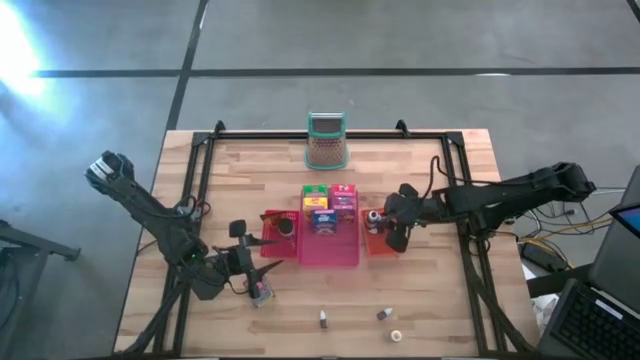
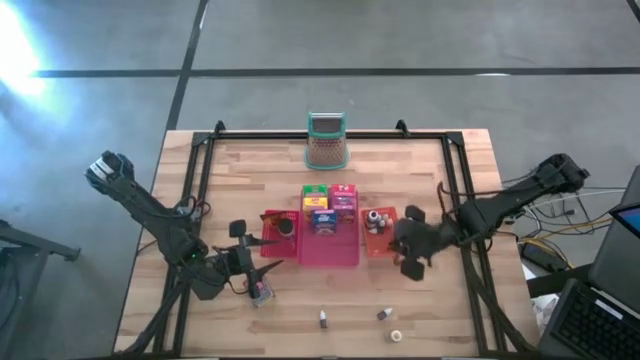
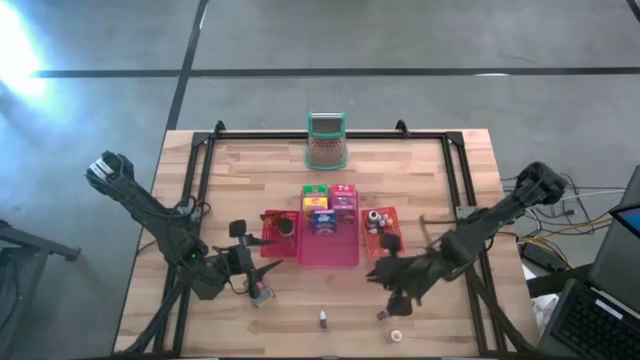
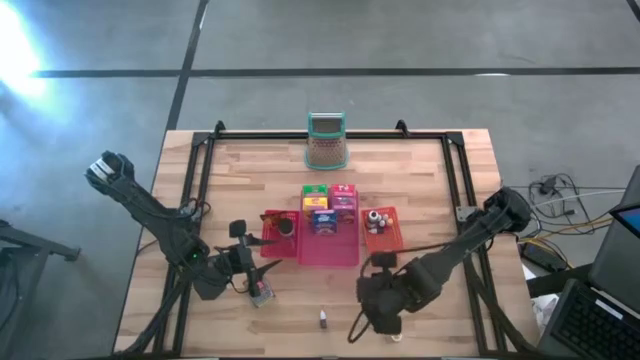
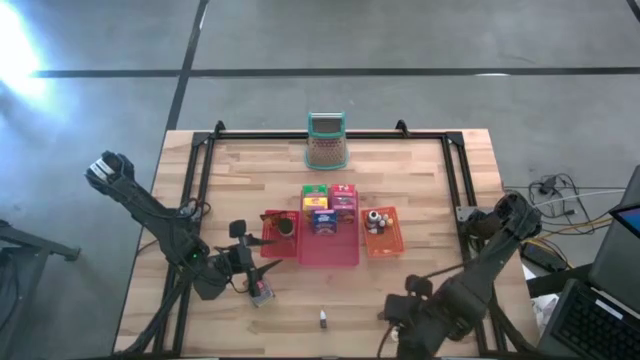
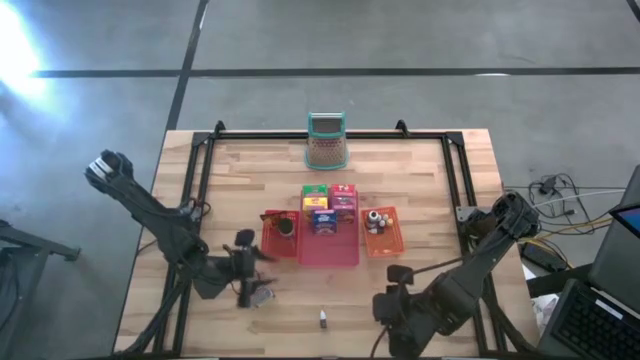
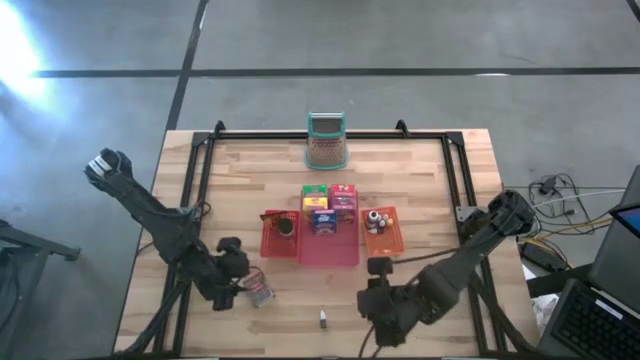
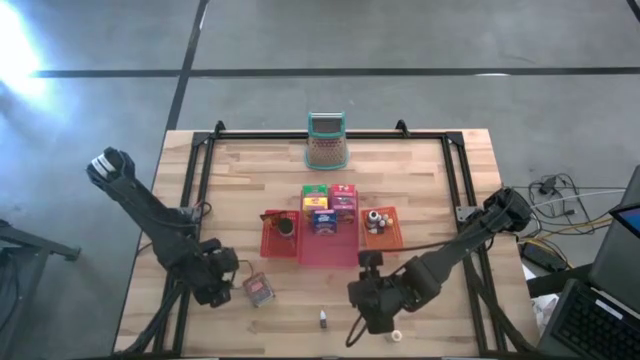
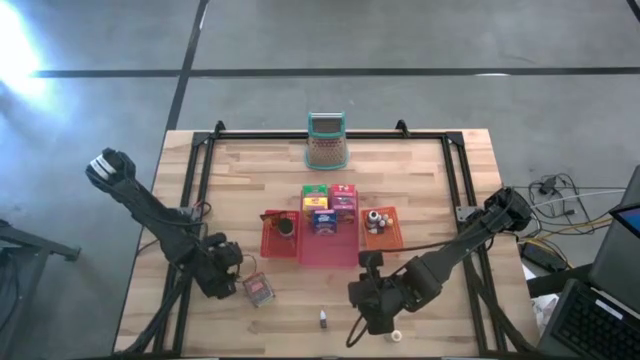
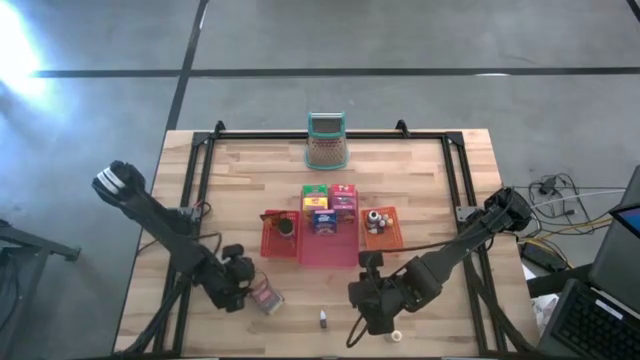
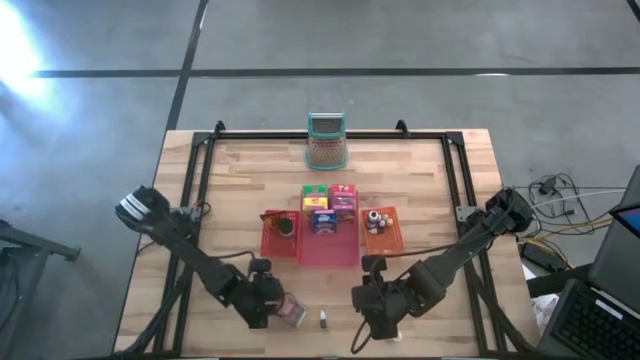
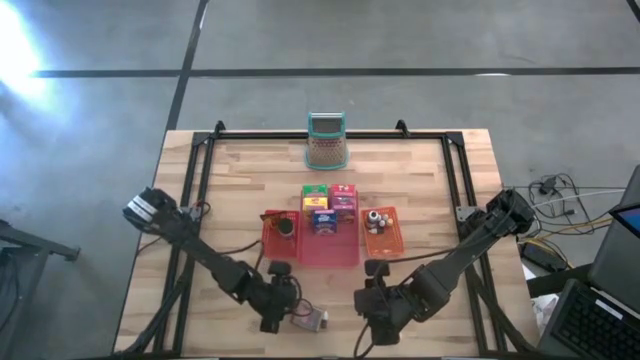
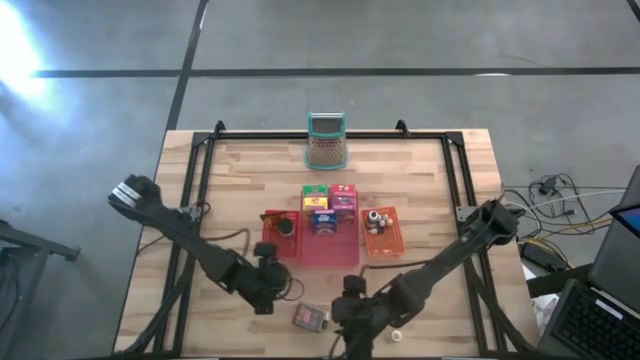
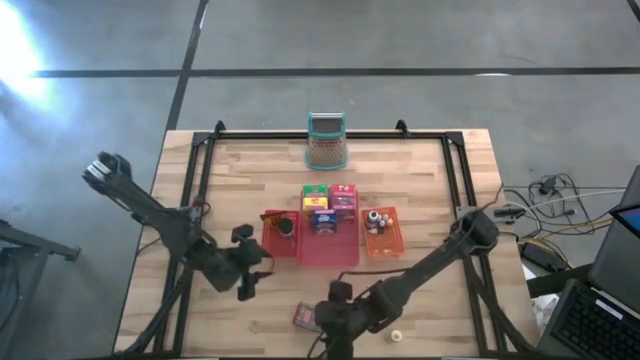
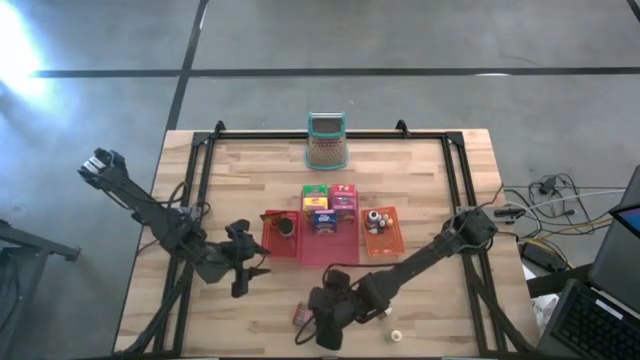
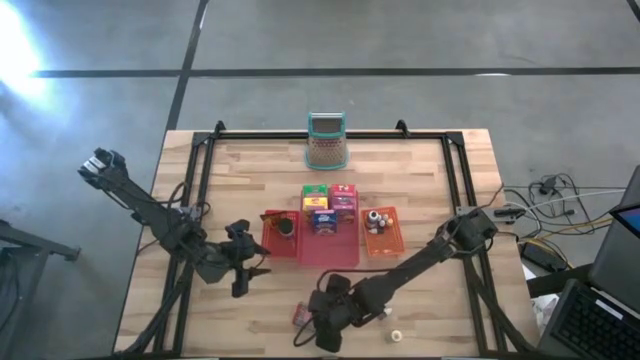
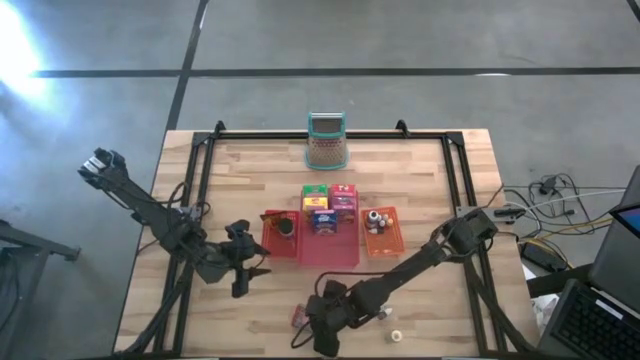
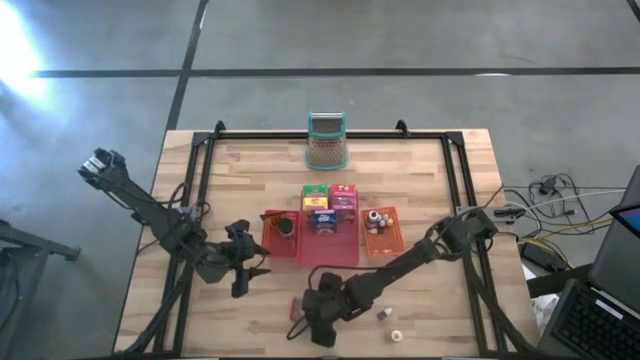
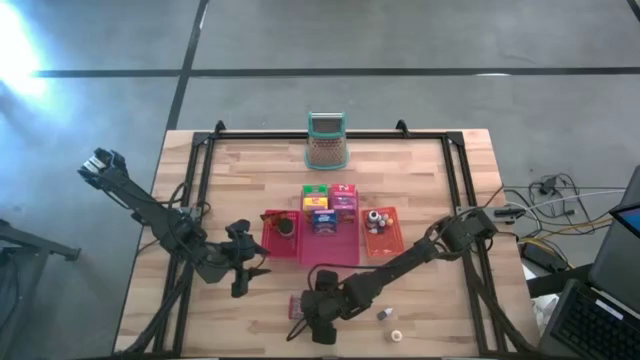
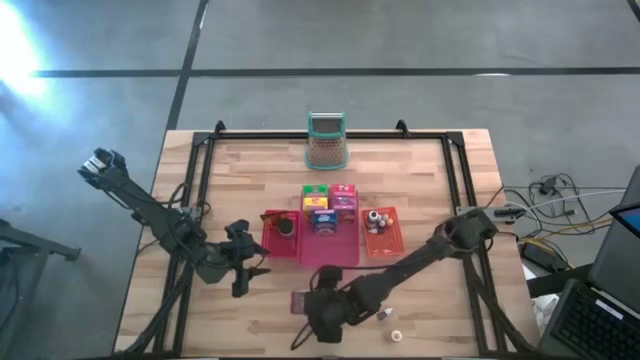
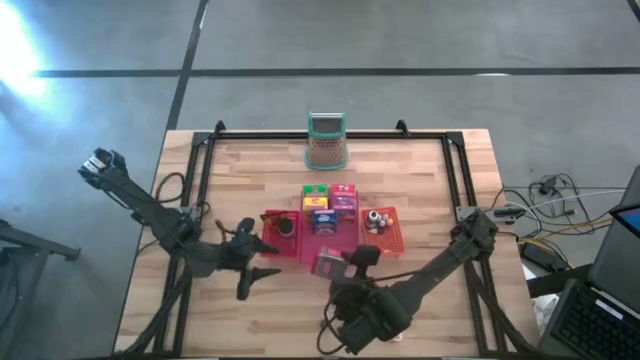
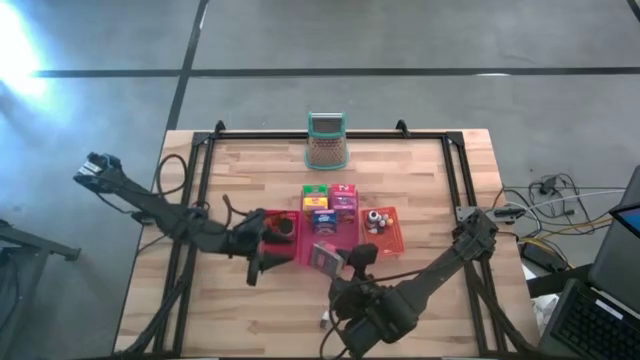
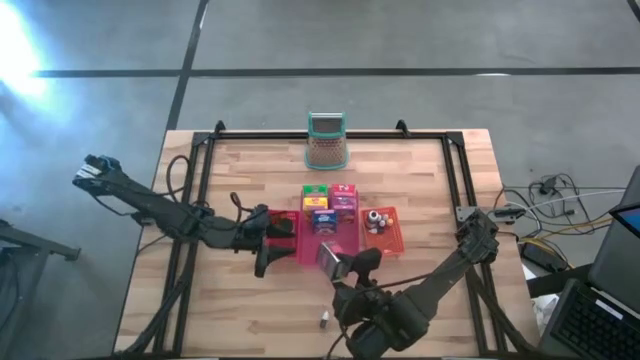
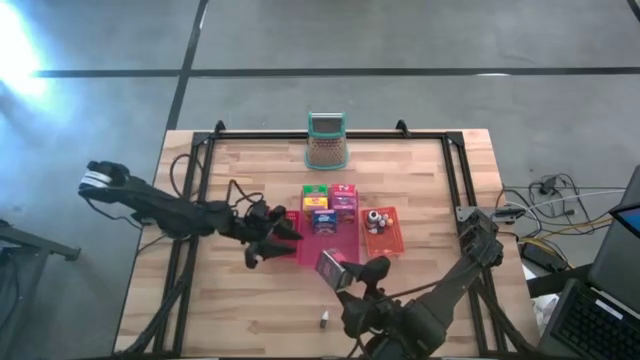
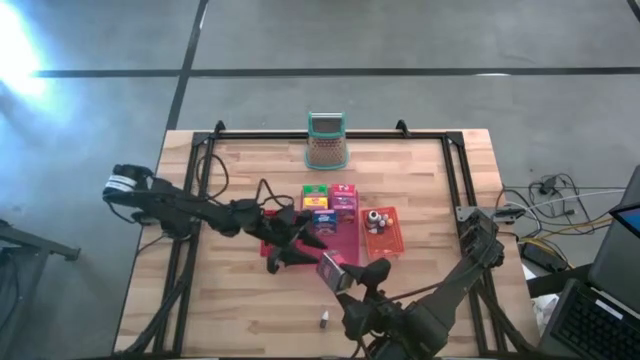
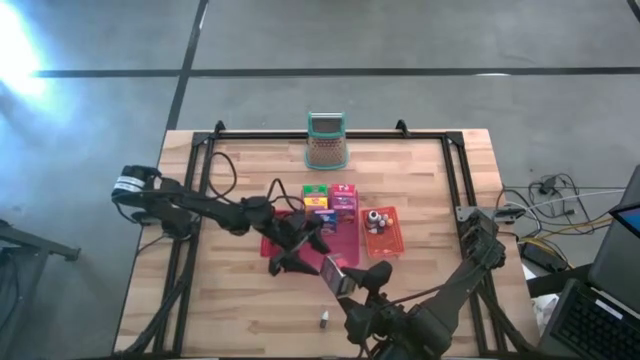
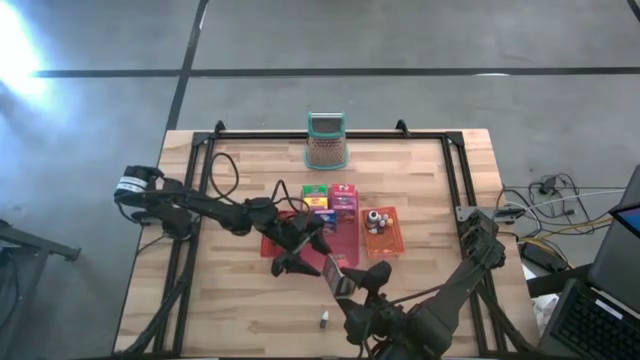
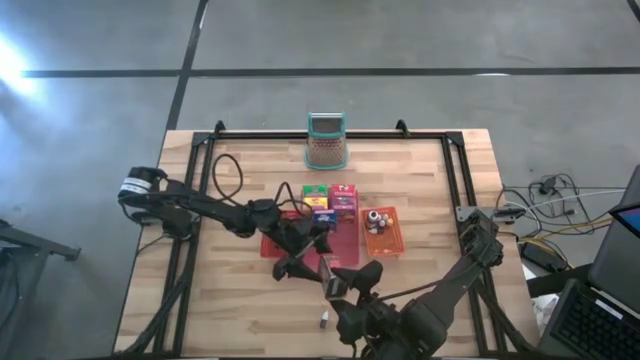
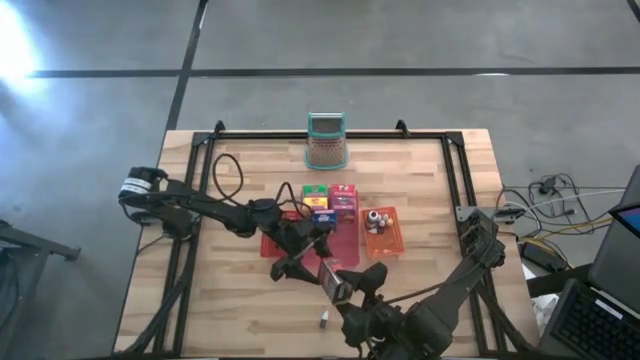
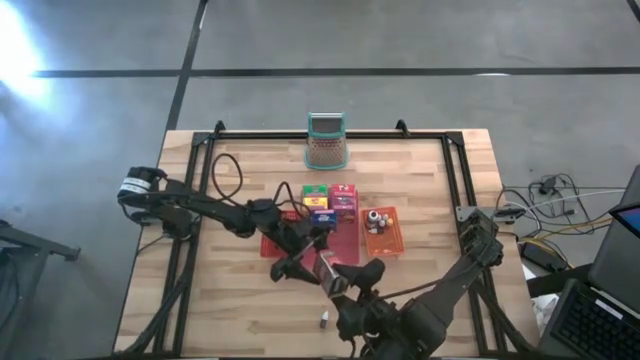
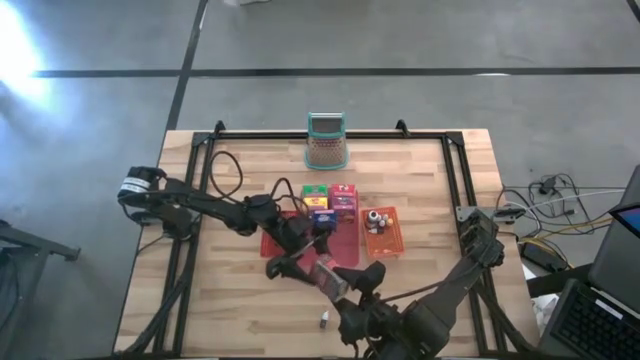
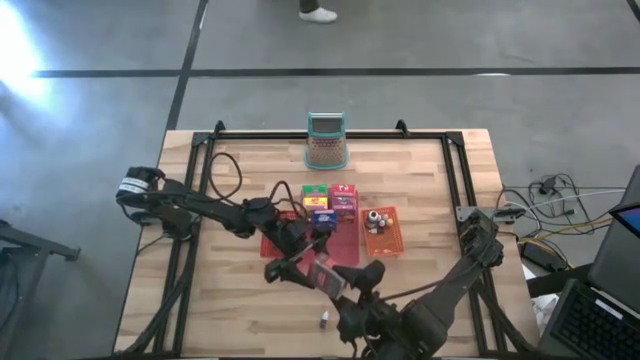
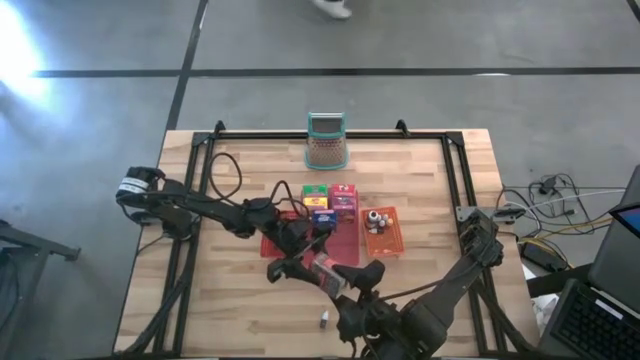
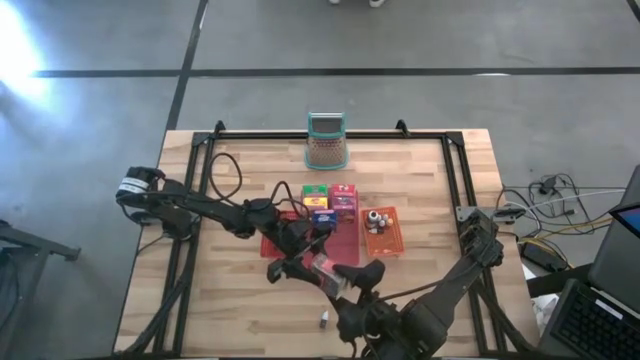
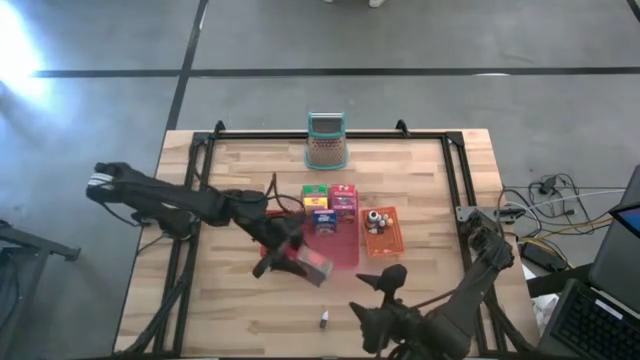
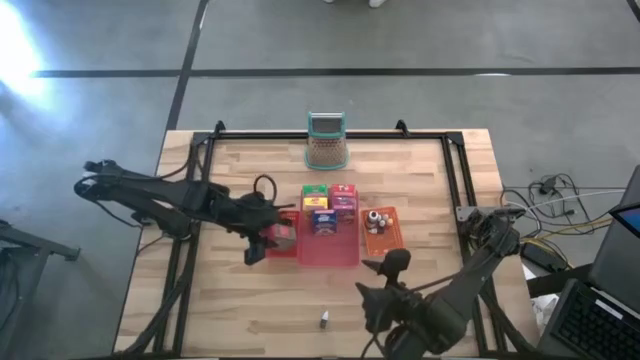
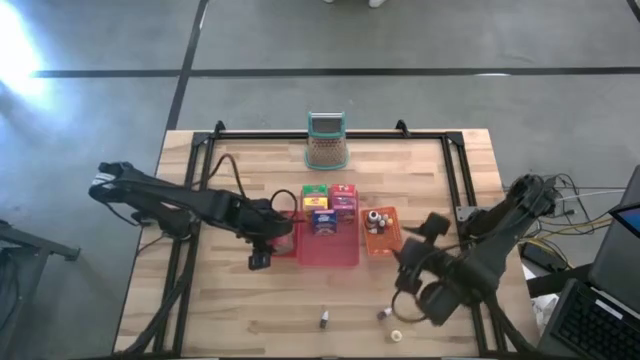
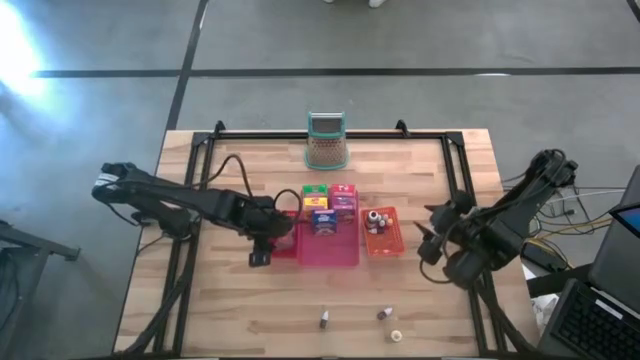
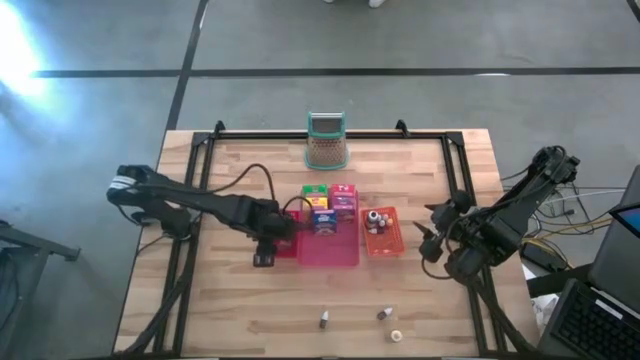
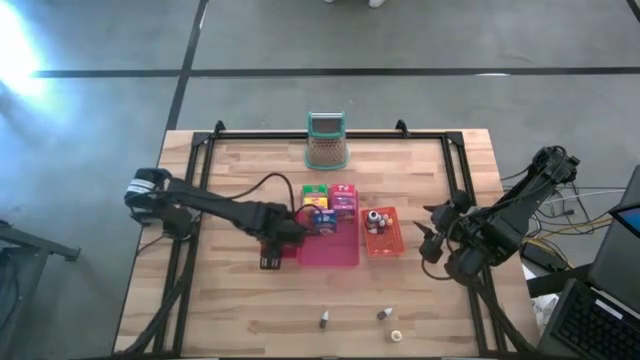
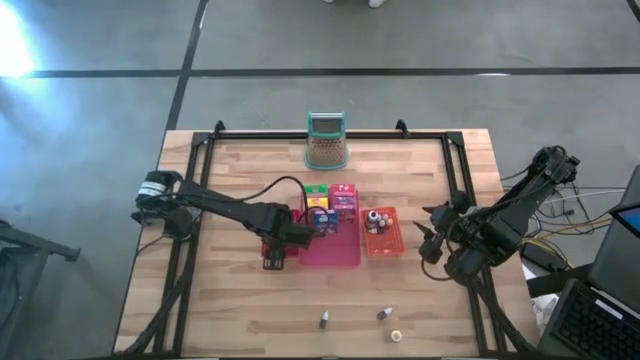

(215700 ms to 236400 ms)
Task: Pick & Place Kitchen Items
Put the red seasoning can into the red bin

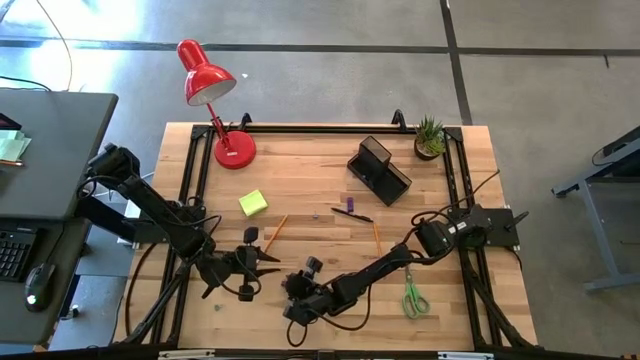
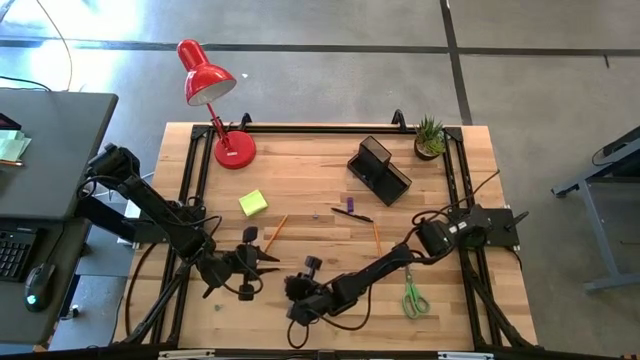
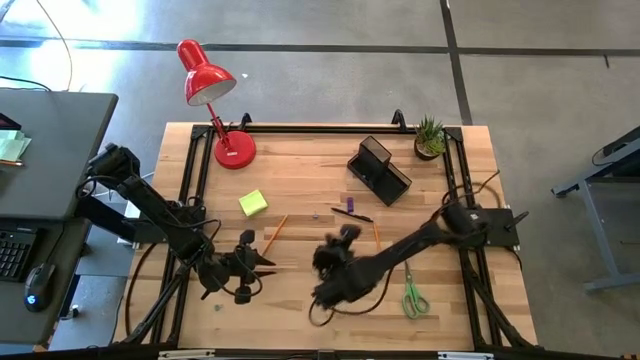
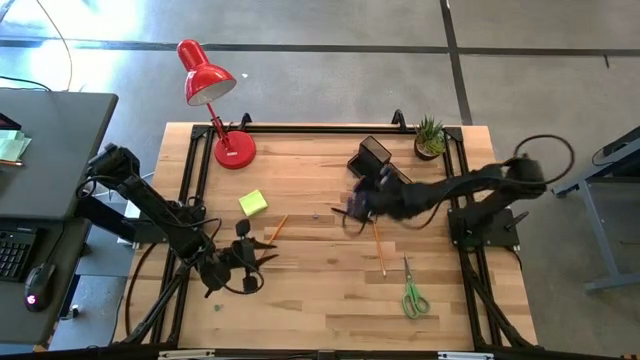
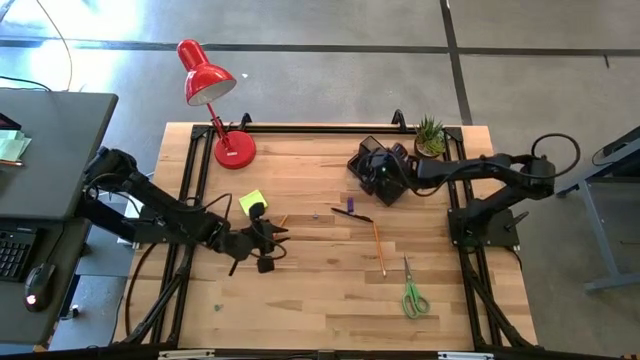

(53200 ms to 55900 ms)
Task: Pick and place office supplies into organizer
Put the pink binder clip into the black desk organizer
